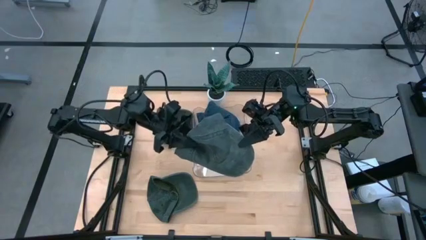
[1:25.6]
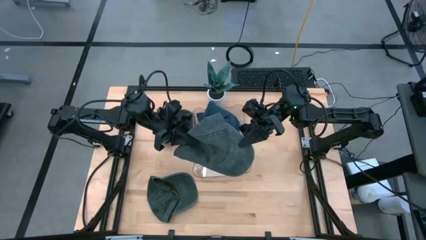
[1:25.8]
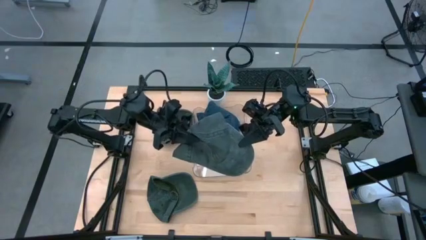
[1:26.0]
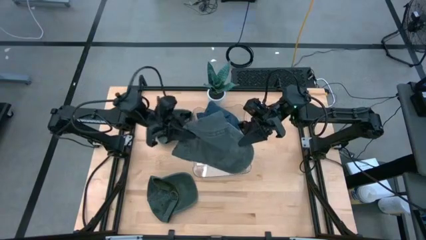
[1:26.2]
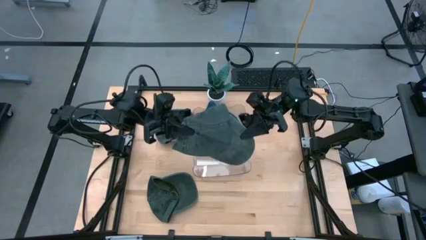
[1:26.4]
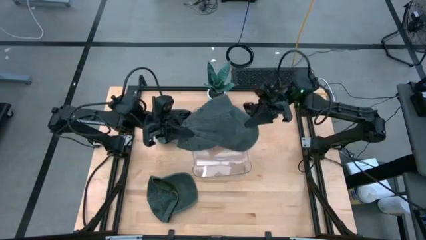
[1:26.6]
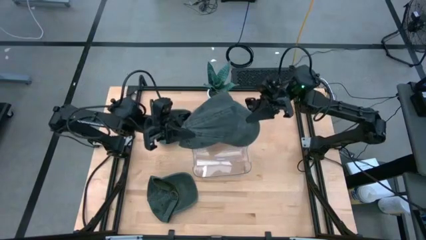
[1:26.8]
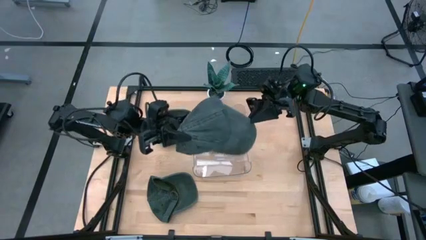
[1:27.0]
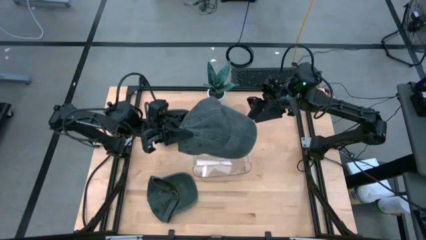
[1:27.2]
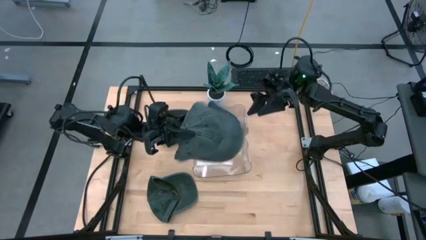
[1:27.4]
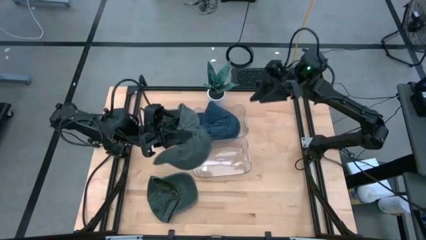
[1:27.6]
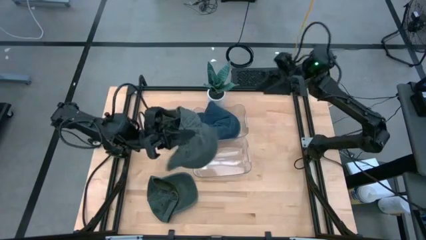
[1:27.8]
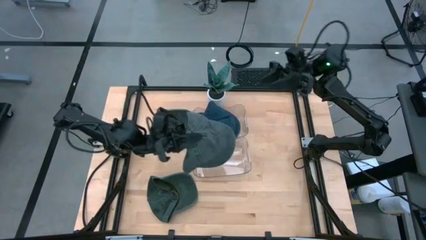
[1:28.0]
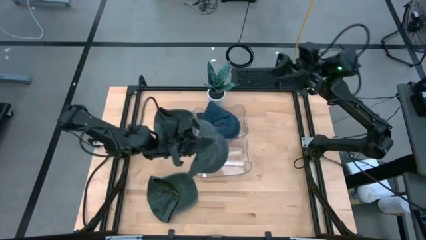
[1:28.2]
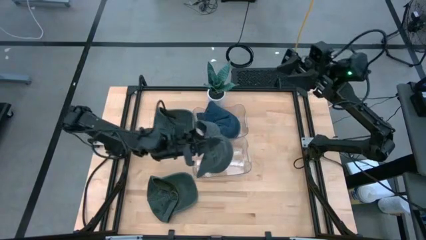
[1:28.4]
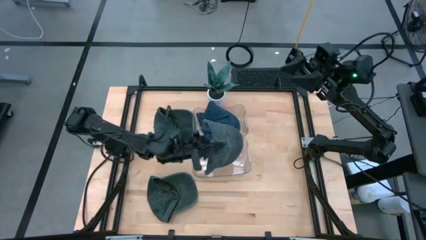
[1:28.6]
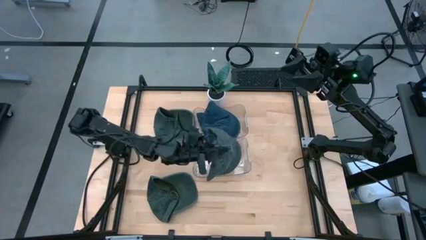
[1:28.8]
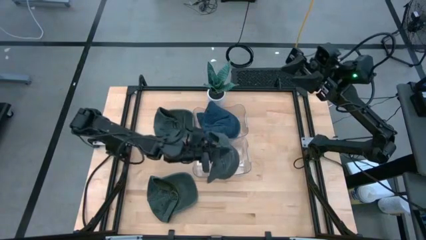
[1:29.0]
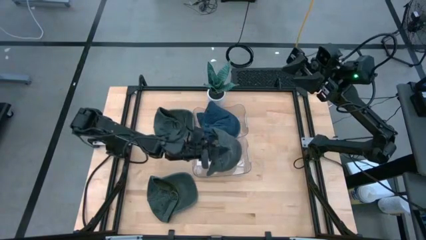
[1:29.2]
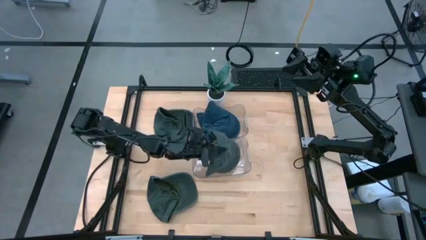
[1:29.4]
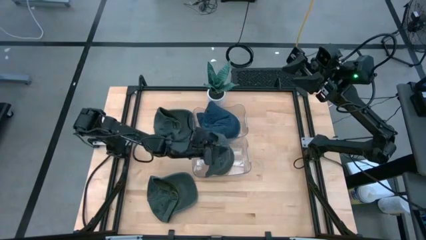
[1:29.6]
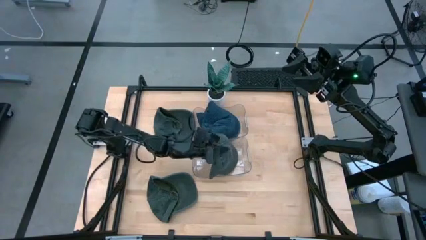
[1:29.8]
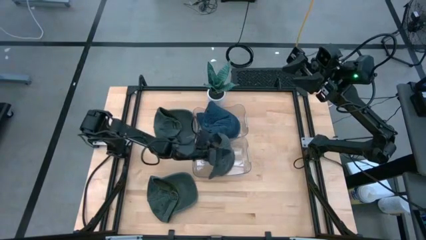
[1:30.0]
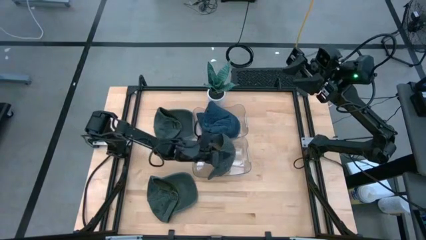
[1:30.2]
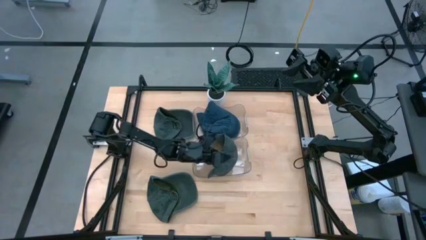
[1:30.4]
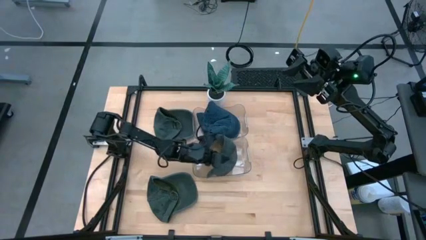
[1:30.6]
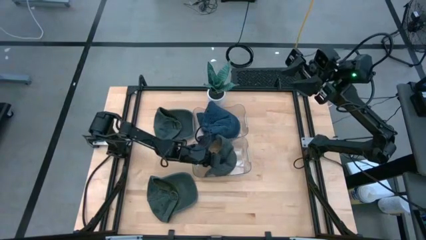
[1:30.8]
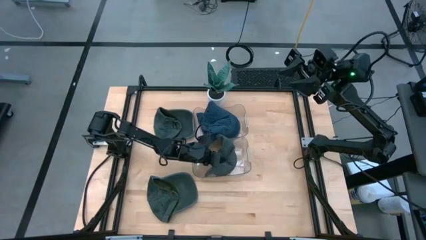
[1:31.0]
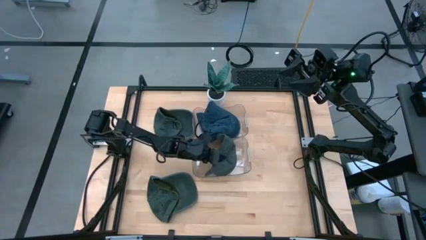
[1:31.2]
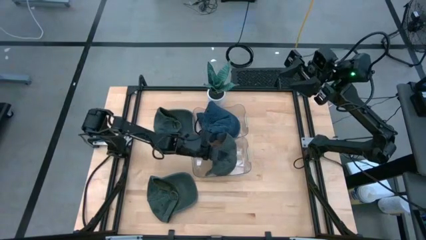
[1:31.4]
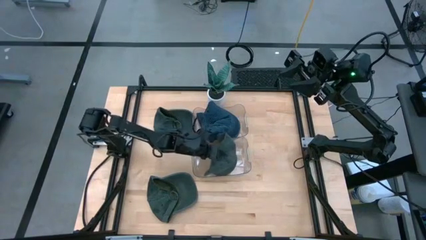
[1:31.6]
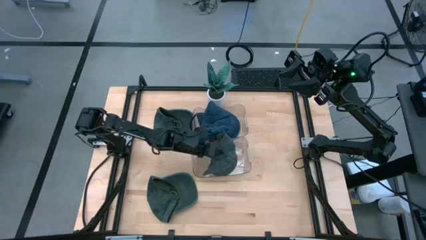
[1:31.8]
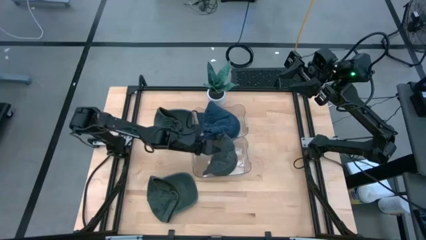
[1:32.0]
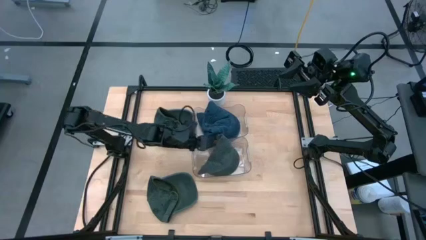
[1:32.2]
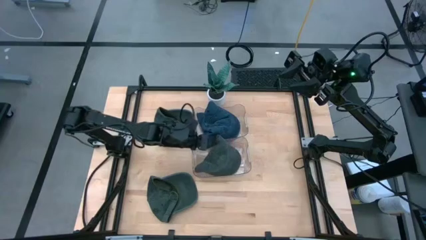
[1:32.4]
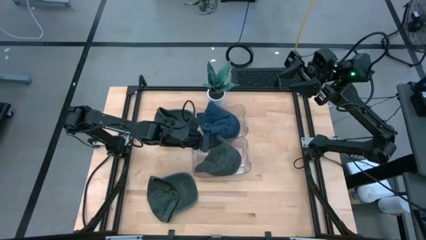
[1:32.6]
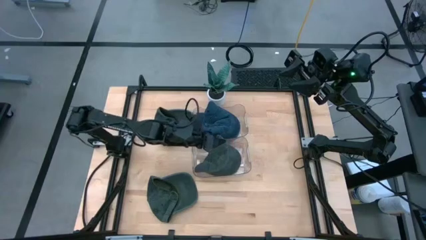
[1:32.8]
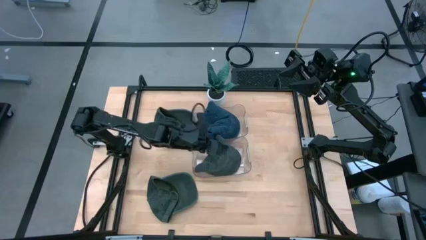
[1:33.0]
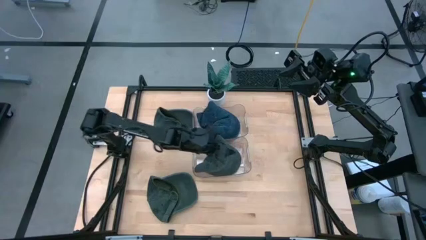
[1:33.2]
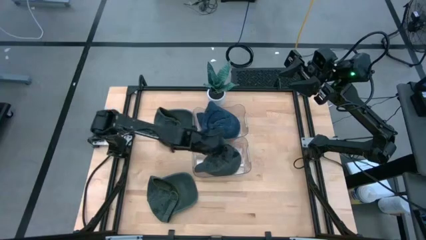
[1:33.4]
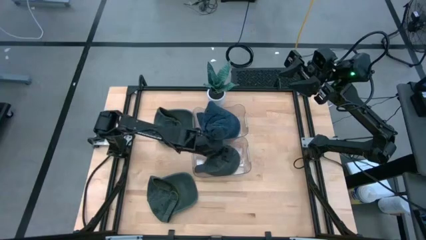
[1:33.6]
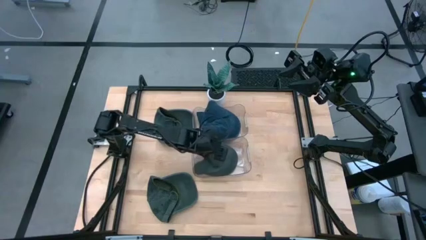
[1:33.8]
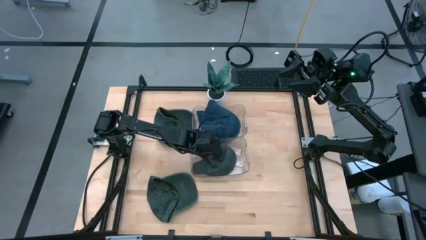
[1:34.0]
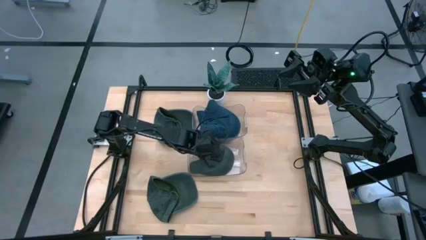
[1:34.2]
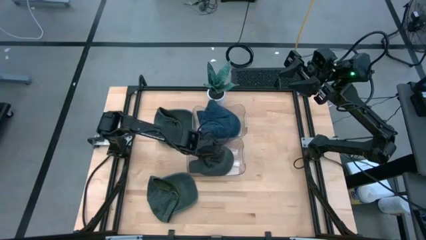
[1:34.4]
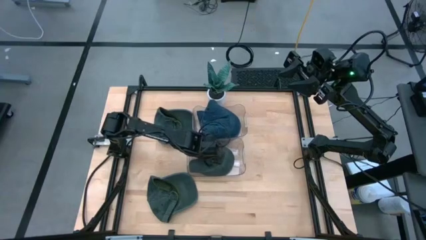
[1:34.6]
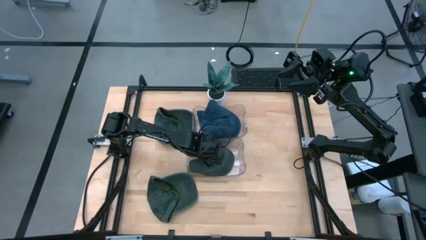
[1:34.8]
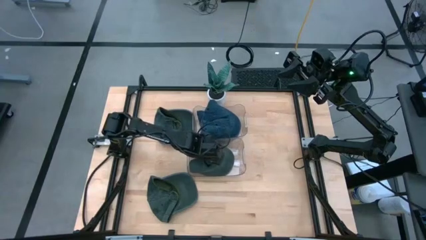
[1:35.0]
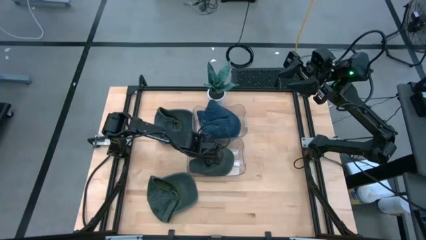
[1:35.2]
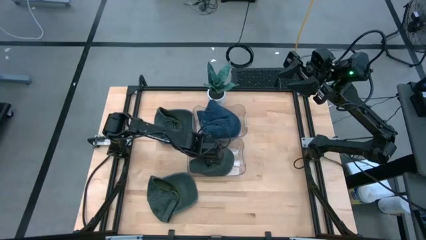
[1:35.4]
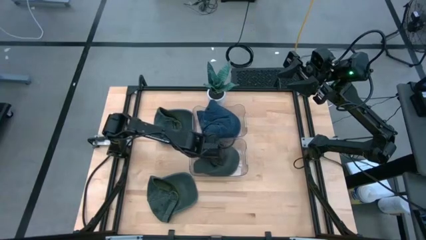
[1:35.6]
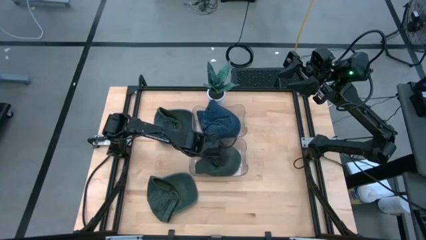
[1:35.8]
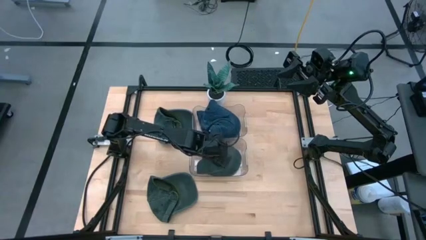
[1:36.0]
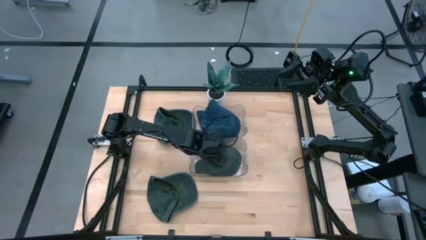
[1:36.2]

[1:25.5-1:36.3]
Task: Pick & Place hat
Put the top right black cap into the bottom transparent bin

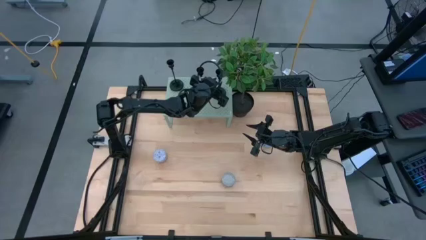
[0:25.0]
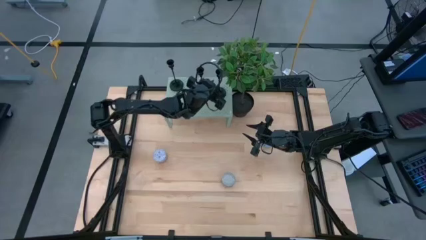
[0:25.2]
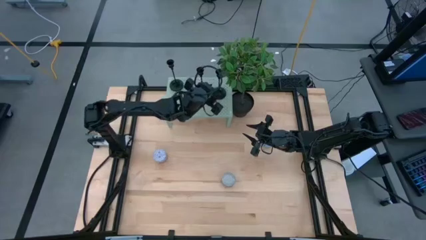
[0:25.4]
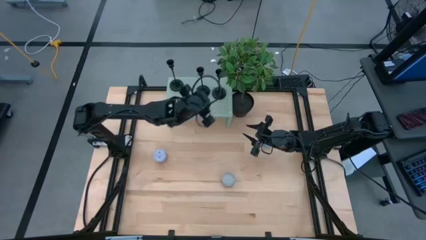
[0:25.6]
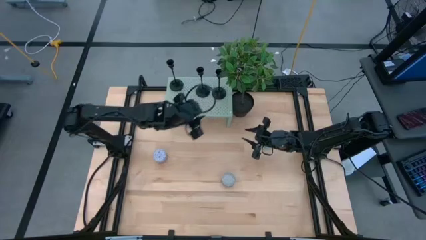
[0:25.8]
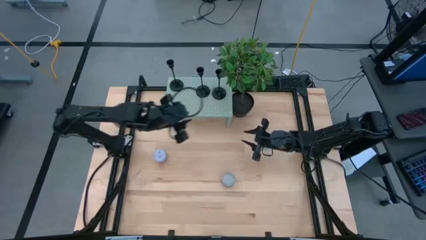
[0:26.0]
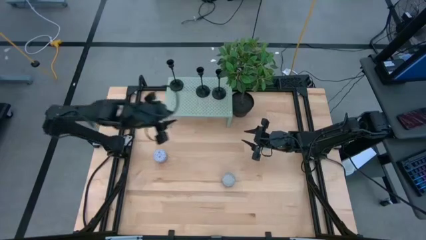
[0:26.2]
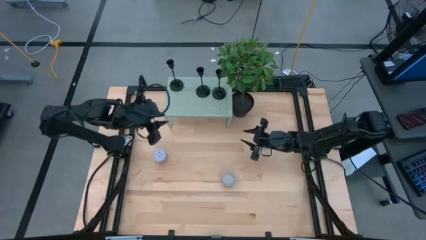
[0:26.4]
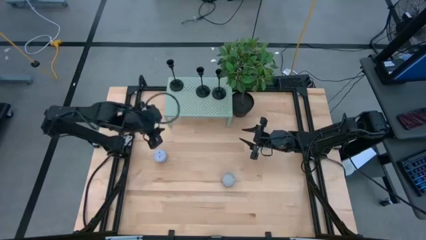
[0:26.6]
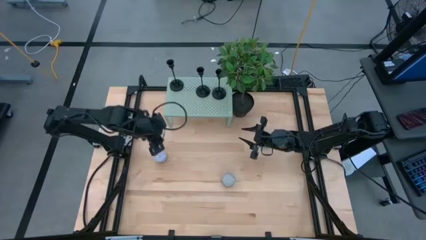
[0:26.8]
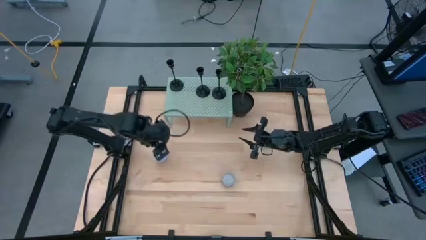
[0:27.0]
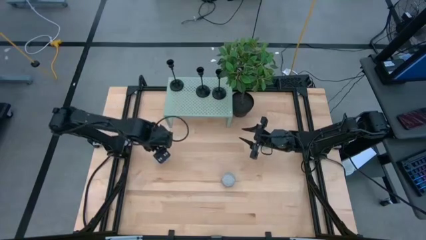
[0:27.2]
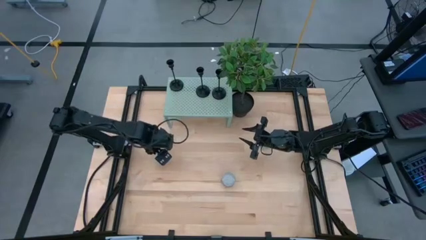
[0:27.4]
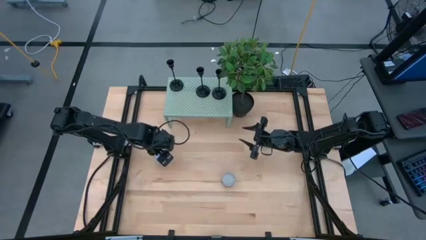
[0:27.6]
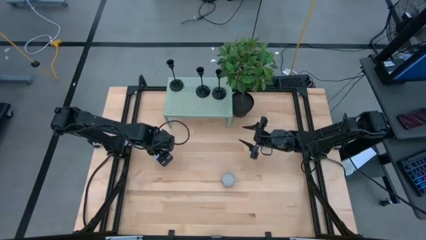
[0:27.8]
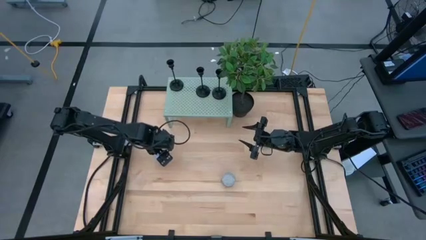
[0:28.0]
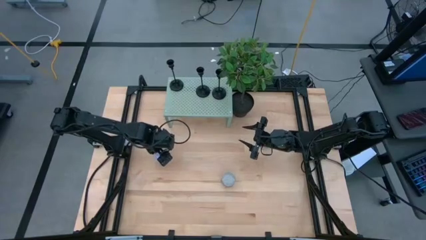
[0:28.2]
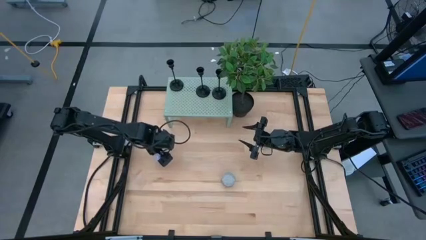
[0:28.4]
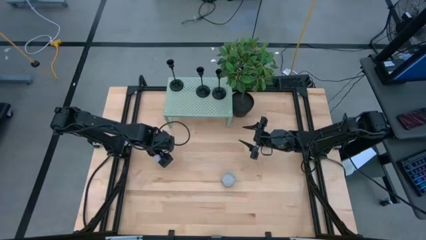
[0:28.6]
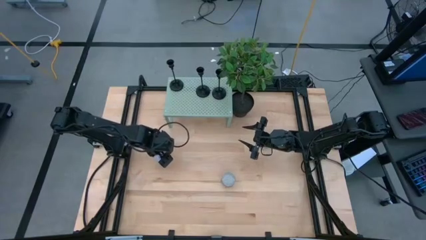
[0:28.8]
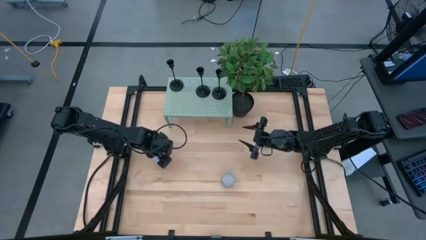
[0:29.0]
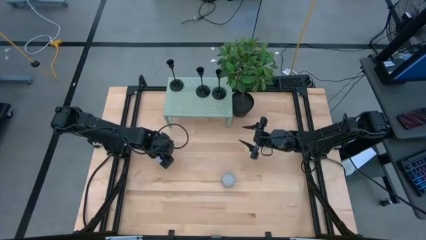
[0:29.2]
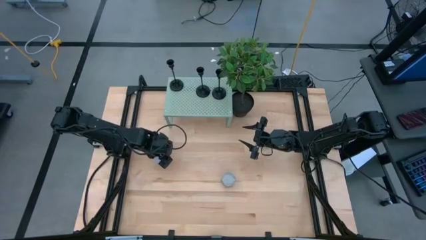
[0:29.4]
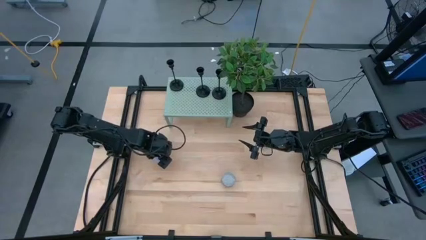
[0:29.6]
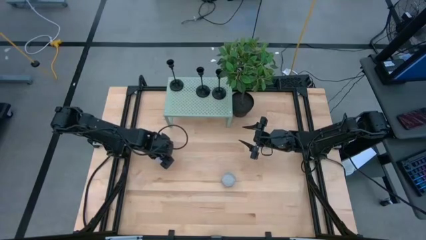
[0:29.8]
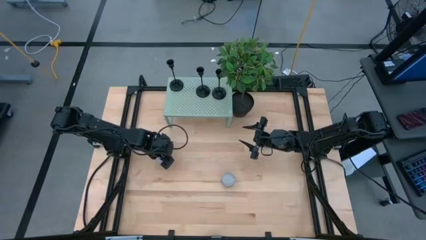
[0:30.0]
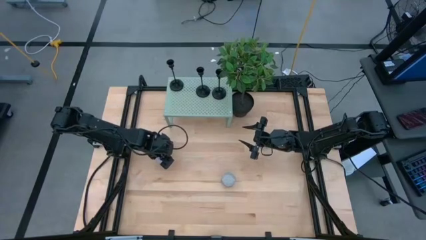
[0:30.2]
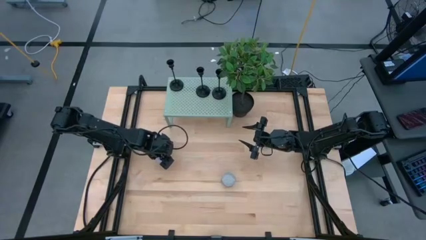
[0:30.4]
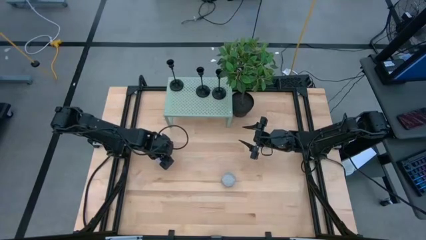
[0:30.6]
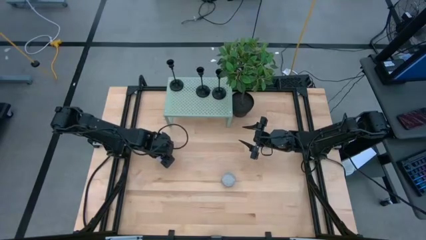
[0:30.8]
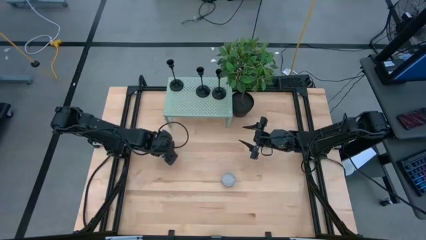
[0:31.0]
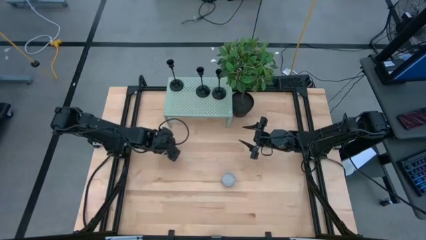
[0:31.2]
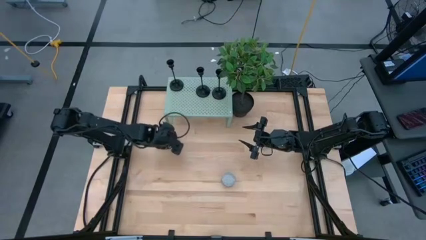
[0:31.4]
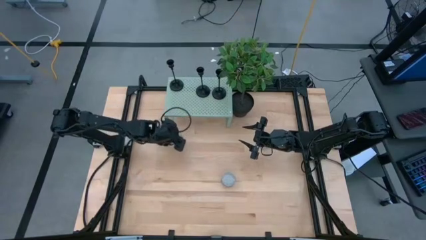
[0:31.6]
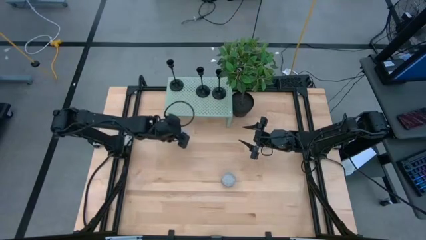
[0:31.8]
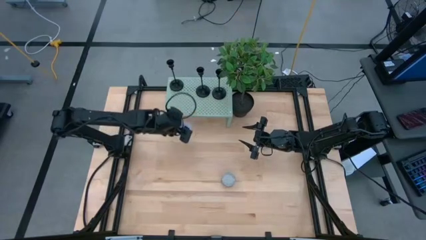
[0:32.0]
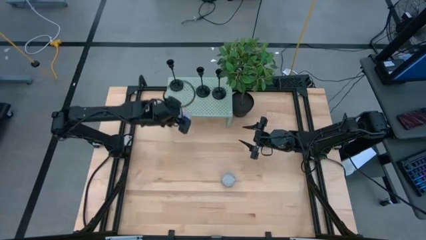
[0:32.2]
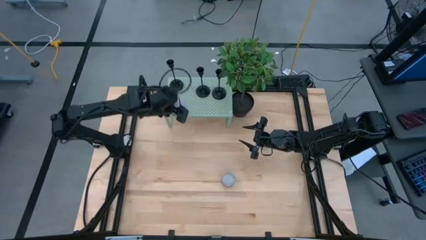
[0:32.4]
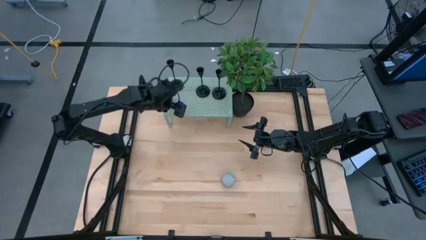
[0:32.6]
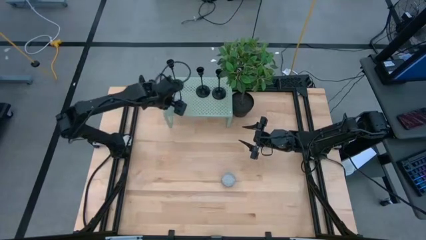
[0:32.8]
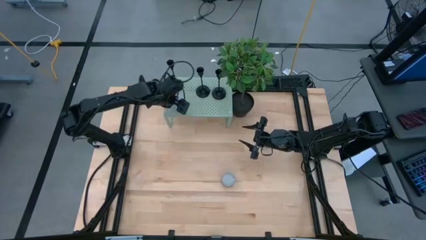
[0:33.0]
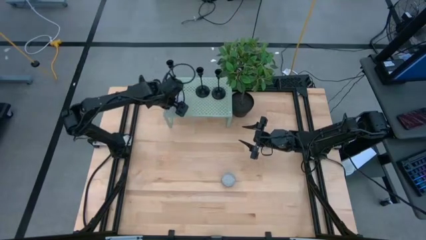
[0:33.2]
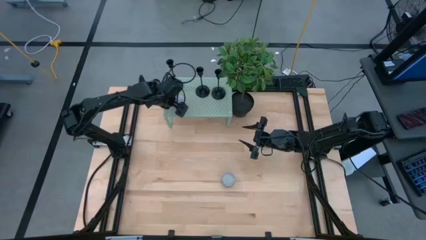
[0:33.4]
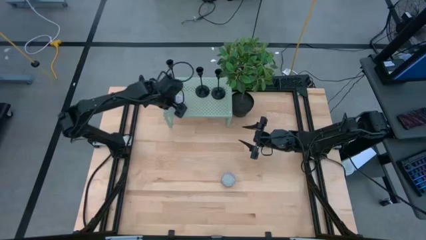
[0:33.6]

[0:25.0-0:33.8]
Task: Pick & Place candle stick holders
Put the red scented candle on the shelf
